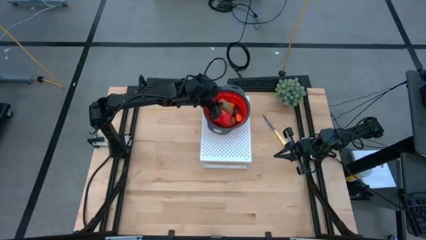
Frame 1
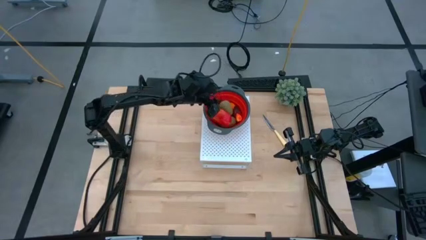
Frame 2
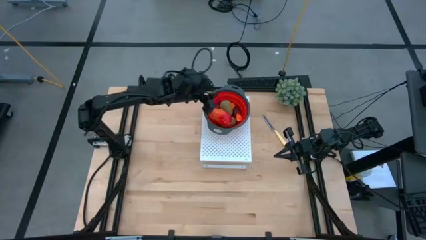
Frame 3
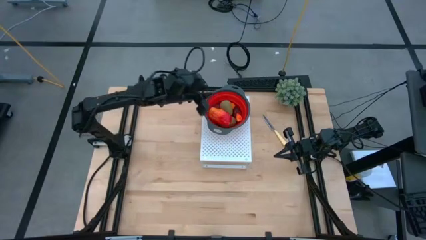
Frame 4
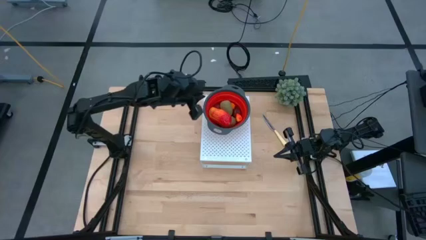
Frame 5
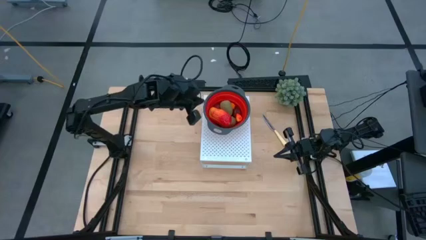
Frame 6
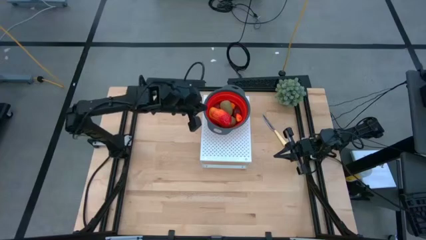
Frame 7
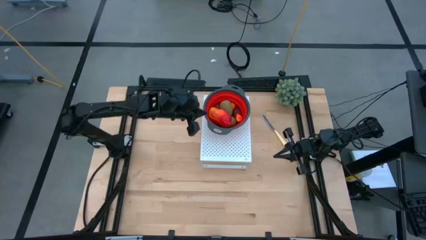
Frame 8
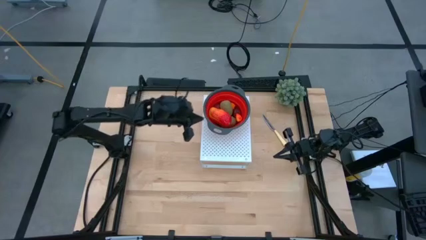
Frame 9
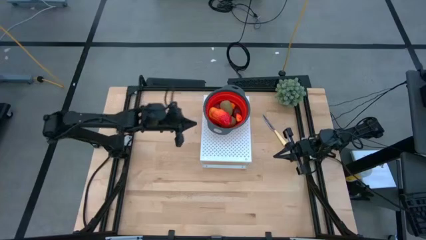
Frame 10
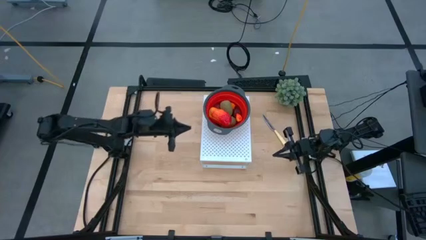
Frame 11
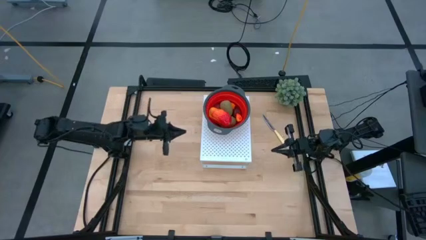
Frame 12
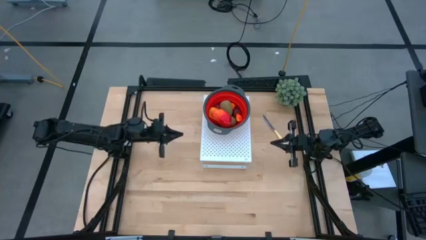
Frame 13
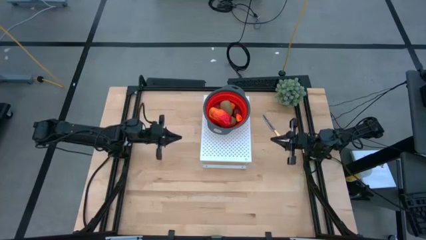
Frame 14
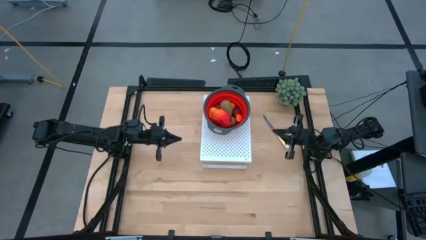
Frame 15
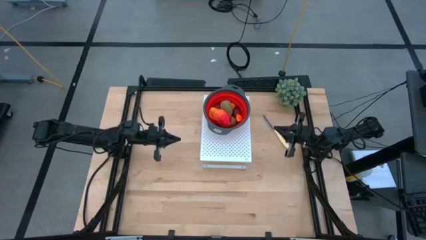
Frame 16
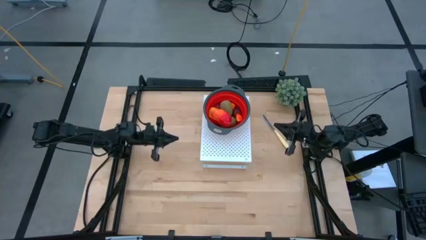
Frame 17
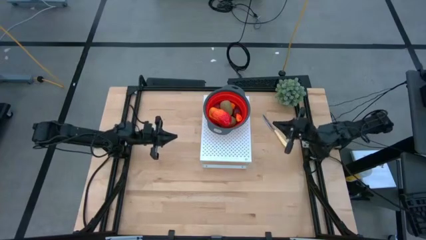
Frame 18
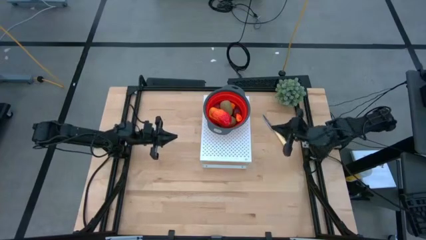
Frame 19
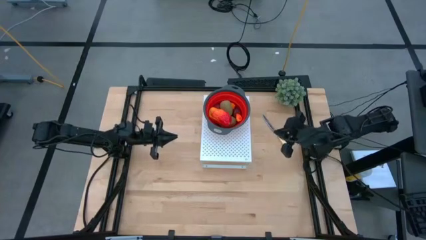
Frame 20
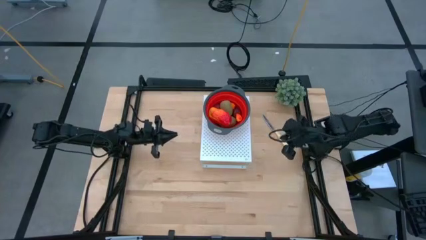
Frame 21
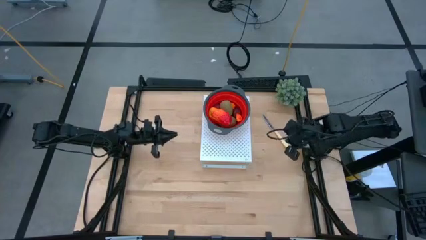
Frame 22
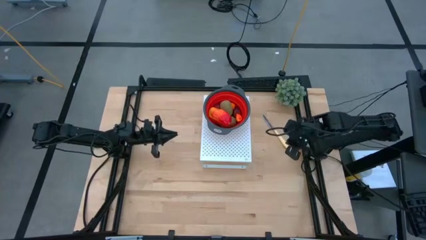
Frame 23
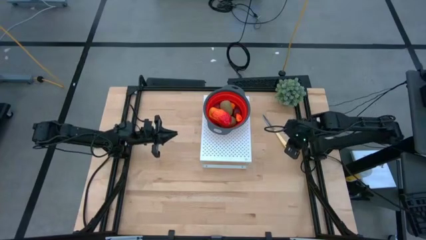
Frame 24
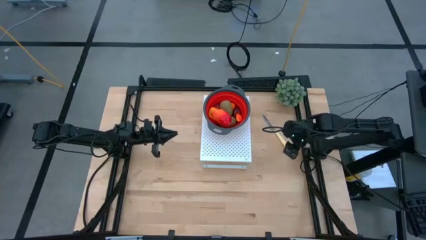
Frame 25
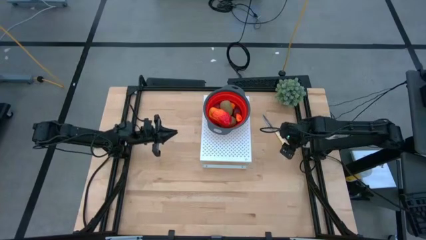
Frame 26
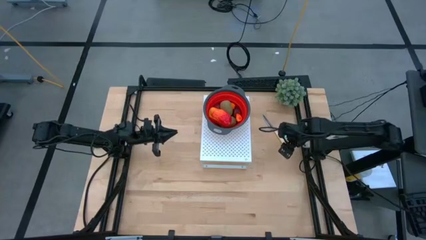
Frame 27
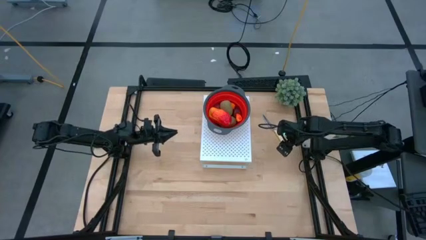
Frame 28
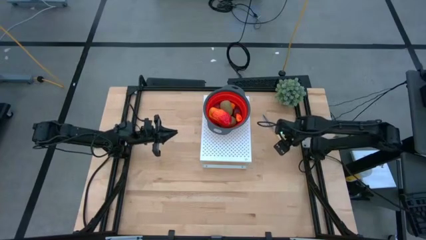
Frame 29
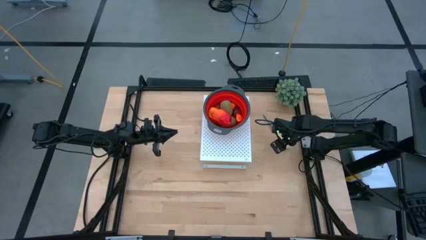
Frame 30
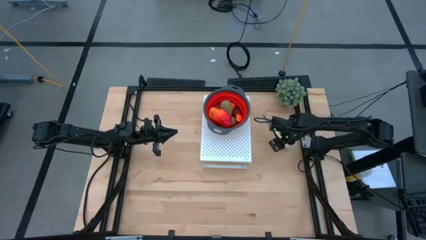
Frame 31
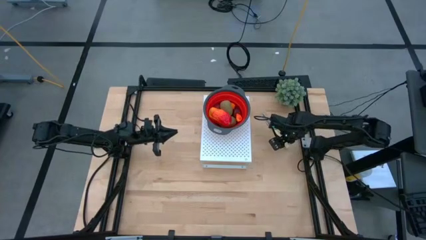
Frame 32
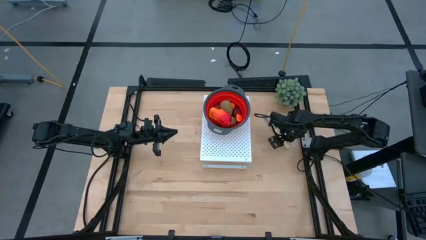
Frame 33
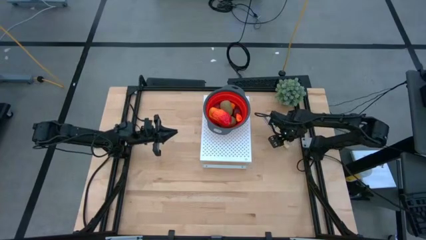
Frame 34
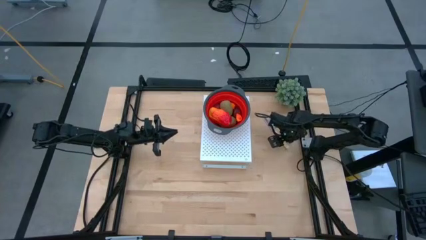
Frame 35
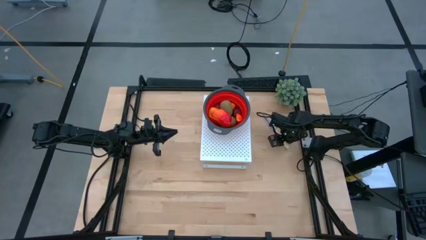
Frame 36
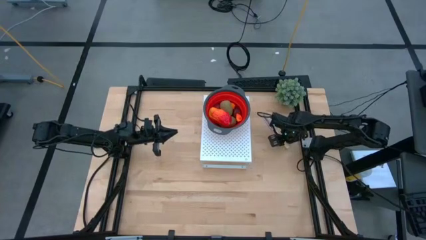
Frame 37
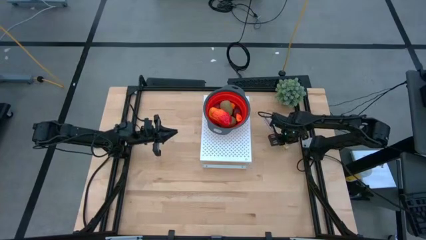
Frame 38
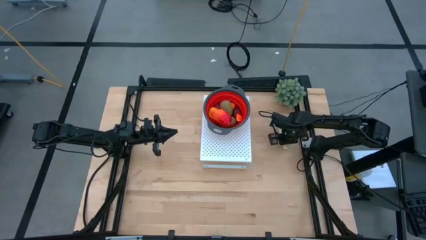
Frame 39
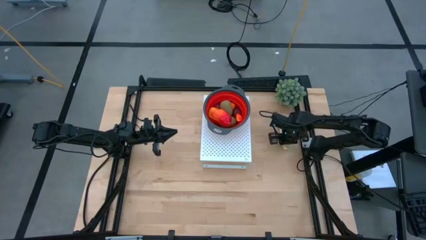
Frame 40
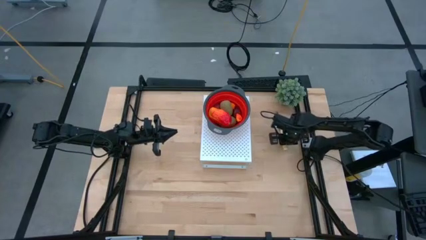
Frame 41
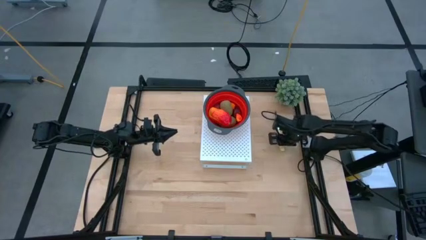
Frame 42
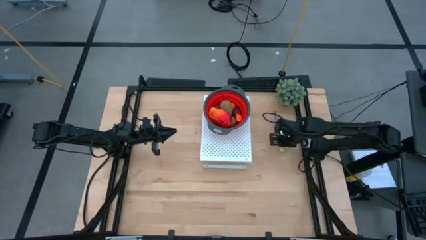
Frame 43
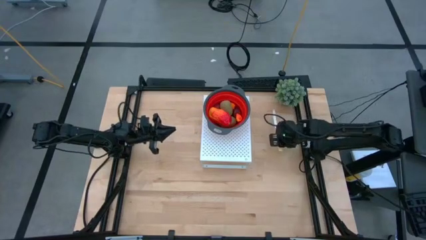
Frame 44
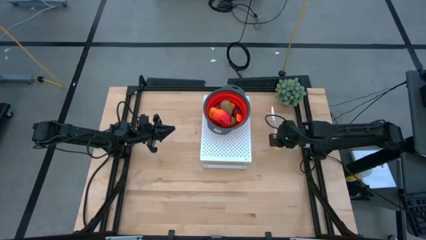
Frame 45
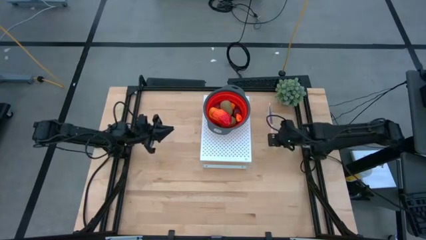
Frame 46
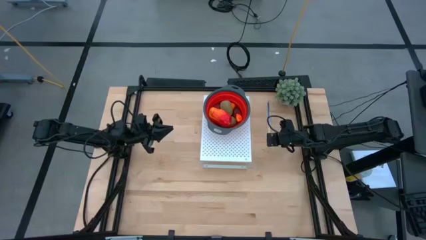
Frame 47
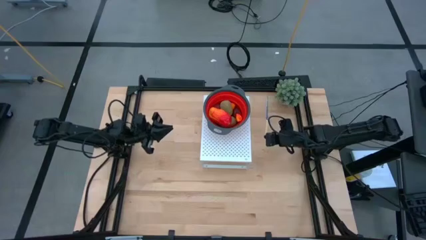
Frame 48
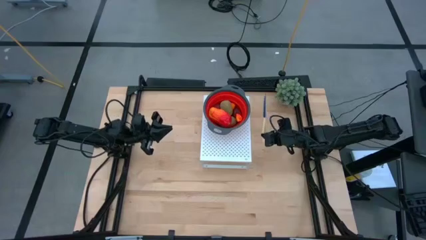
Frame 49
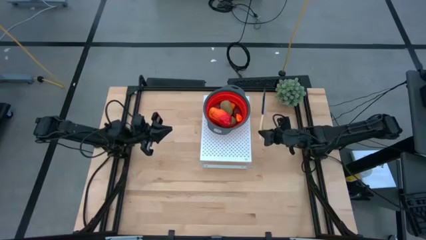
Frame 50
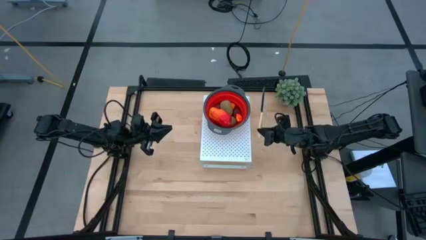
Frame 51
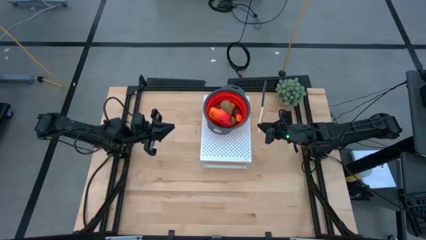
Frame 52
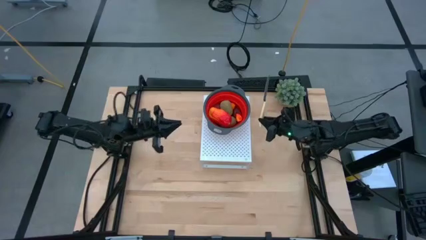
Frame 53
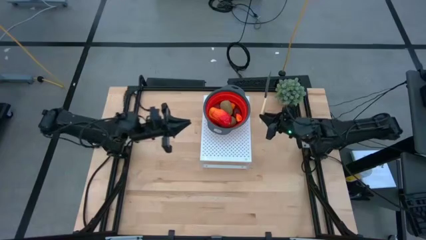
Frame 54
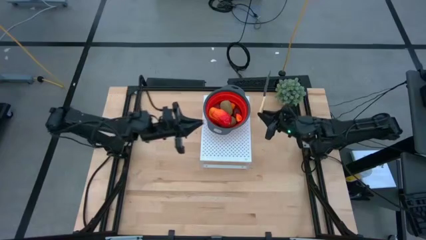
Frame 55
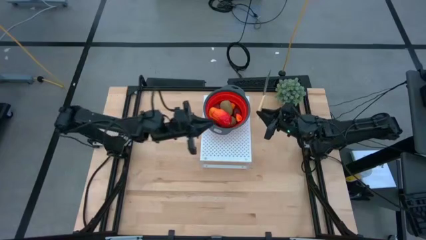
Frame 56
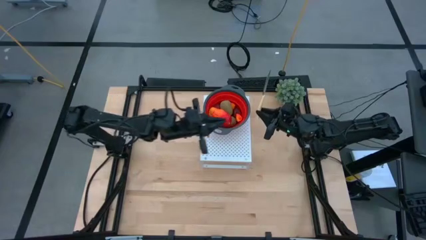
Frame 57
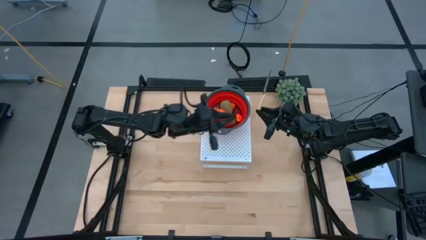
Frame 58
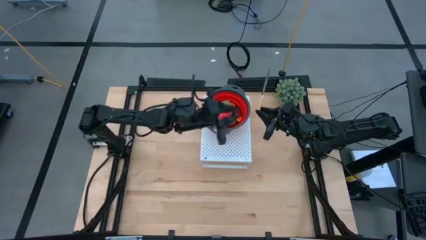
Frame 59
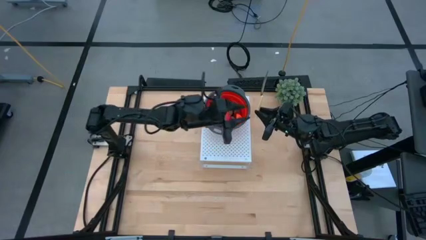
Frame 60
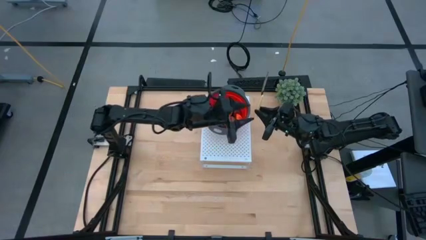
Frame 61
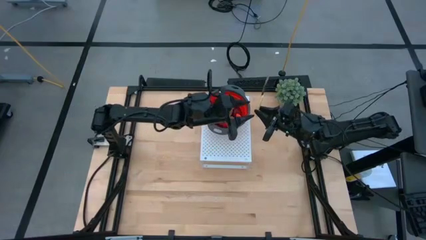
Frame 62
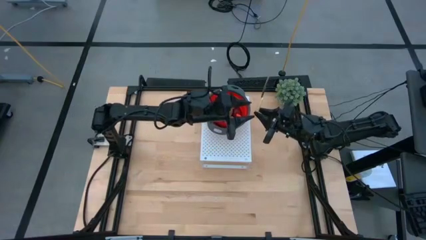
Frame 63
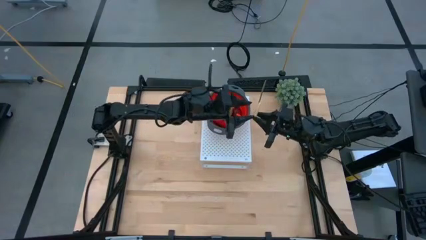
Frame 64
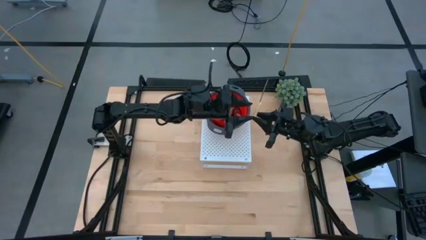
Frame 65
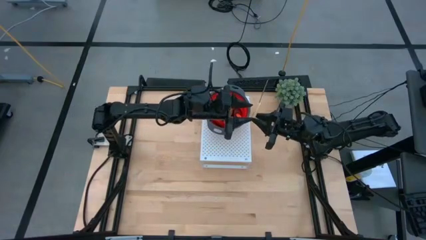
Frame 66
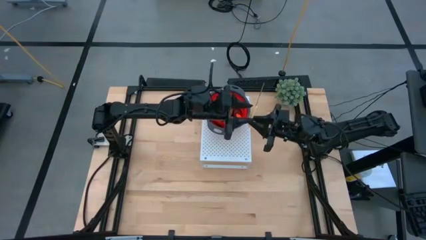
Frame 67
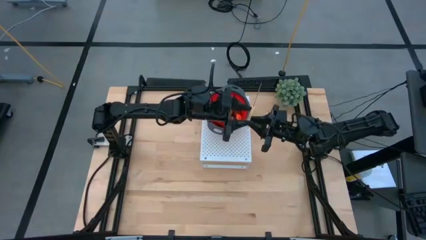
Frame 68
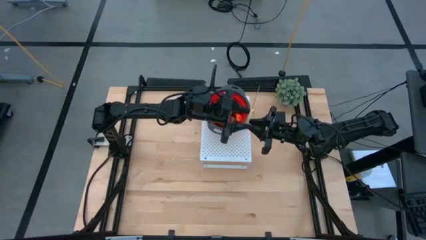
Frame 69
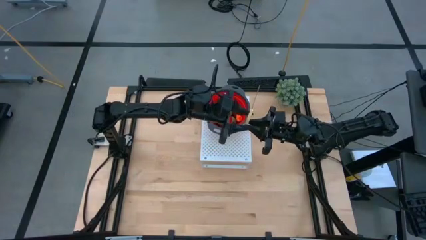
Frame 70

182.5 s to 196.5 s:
Task: Pick & Place Fruit
Put the yellow knife on the shelf

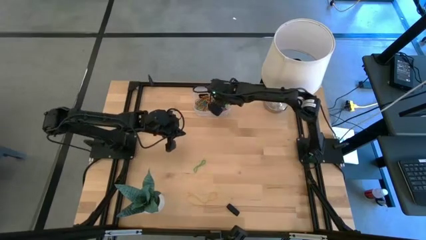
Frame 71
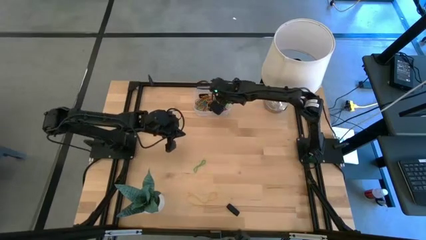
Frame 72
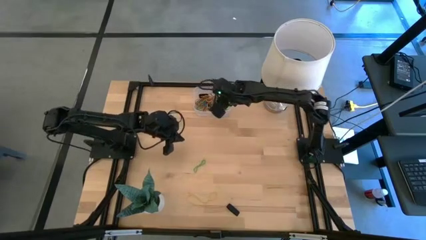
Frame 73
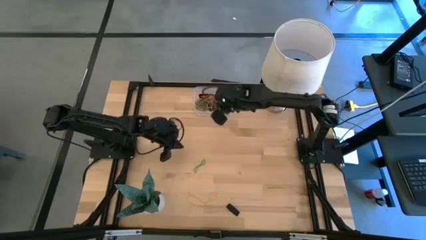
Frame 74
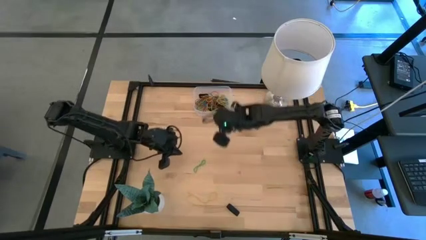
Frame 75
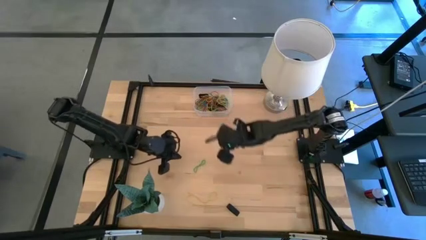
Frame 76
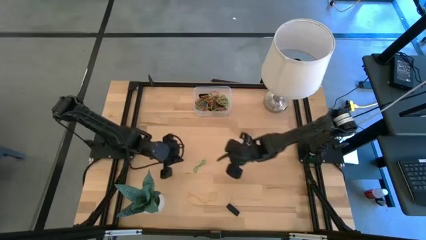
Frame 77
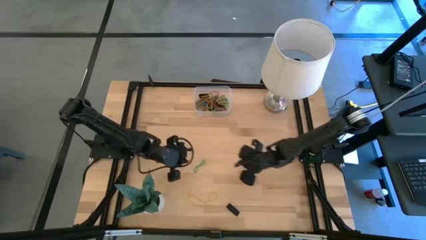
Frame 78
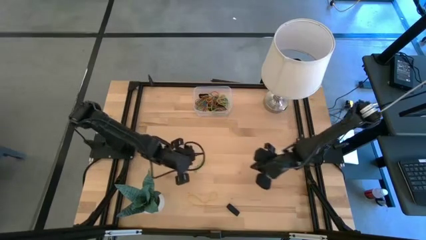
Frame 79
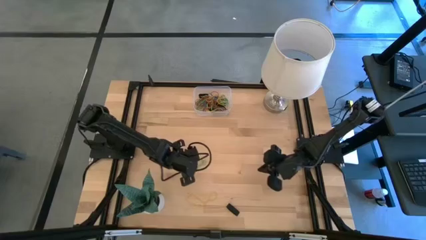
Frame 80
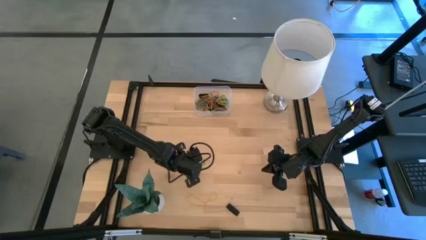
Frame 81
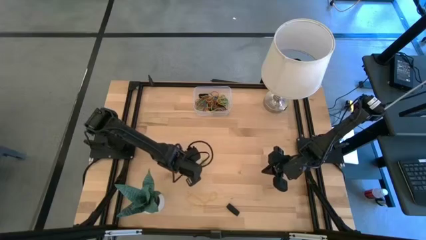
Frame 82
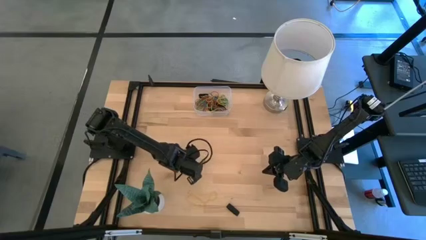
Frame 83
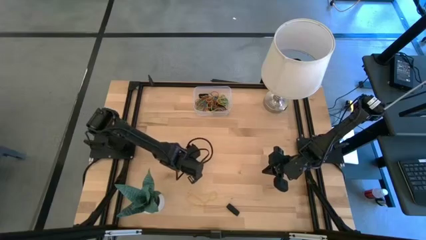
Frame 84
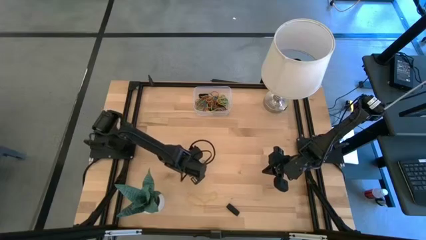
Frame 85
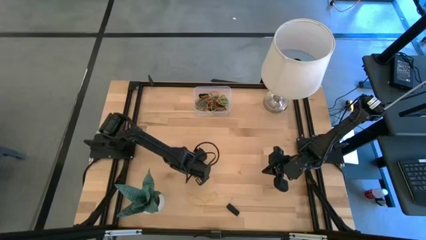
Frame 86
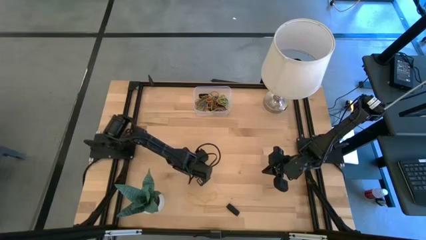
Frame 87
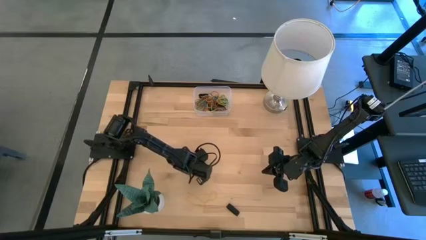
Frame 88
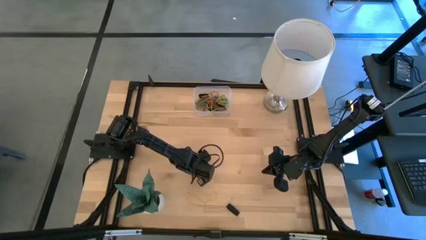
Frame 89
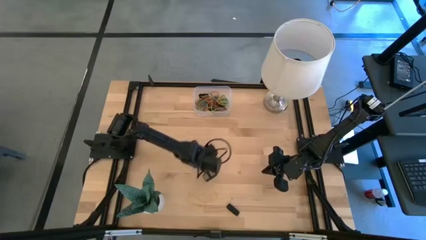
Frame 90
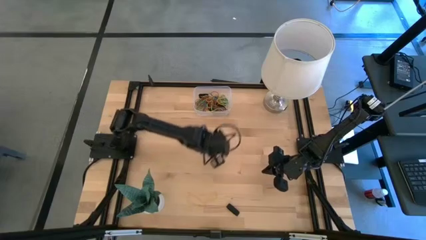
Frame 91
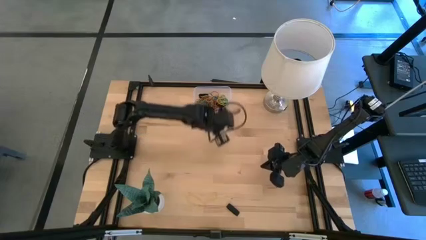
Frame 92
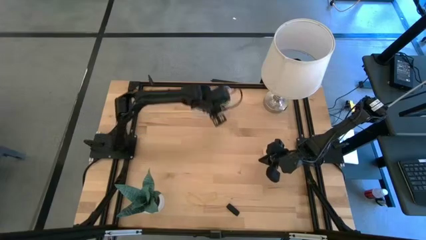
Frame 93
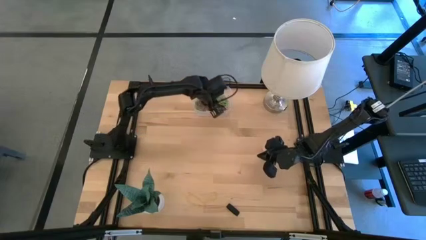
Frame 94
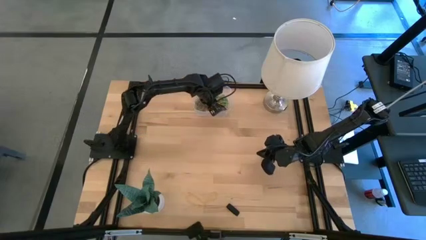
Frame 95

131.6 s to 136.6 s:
Task: Pick and place rubber bands into bin
Put the green rubber band into the transparent bin
